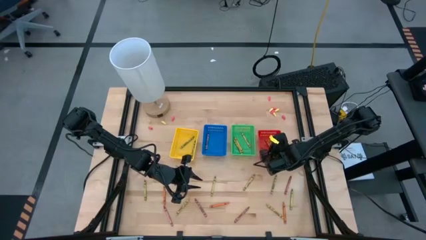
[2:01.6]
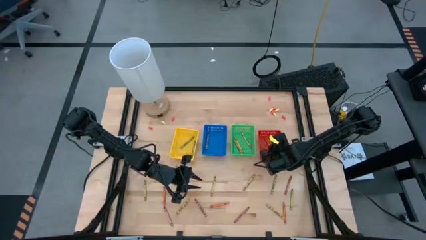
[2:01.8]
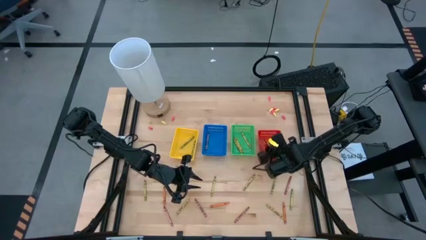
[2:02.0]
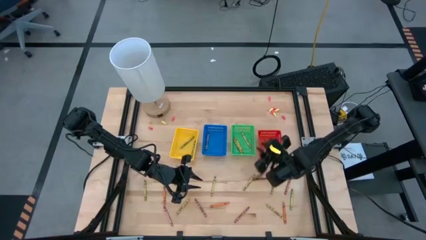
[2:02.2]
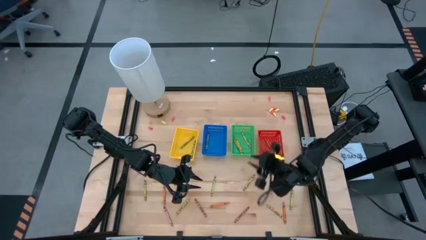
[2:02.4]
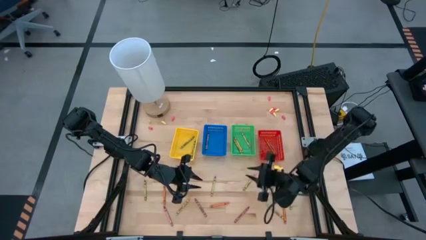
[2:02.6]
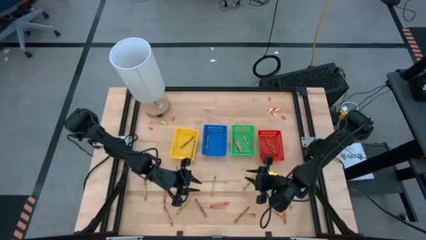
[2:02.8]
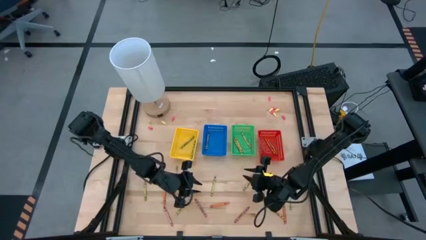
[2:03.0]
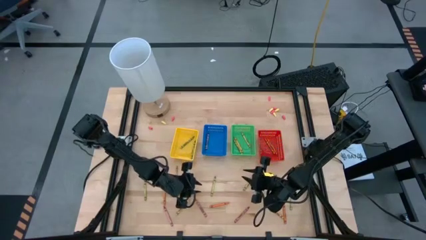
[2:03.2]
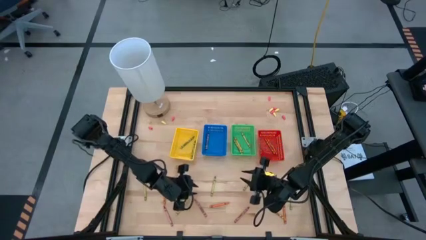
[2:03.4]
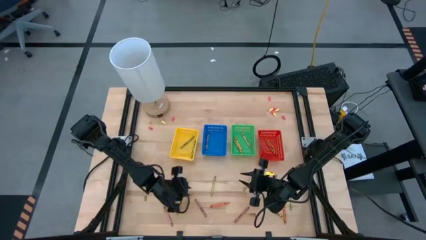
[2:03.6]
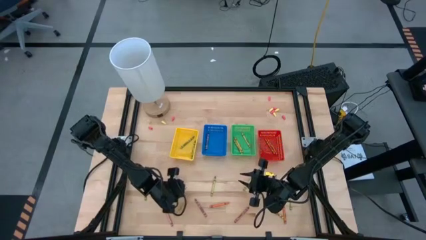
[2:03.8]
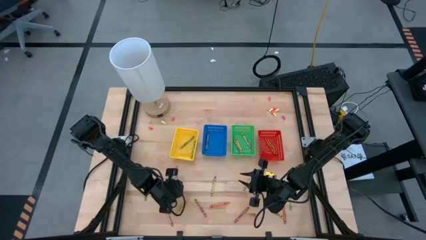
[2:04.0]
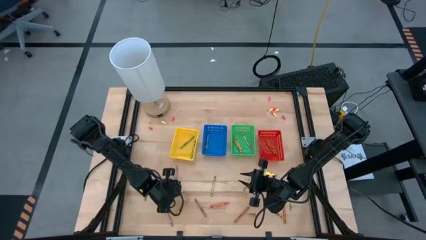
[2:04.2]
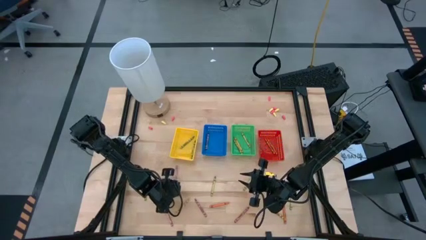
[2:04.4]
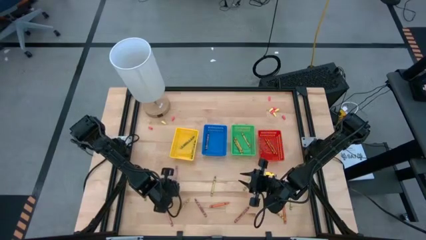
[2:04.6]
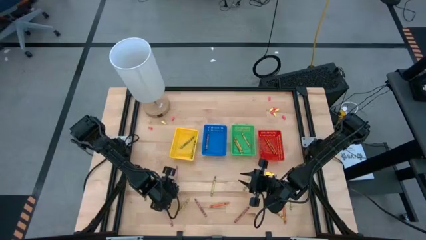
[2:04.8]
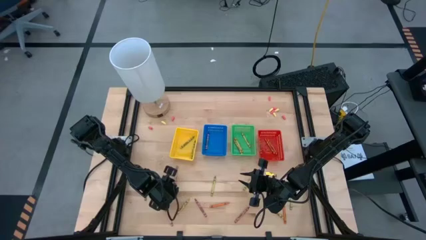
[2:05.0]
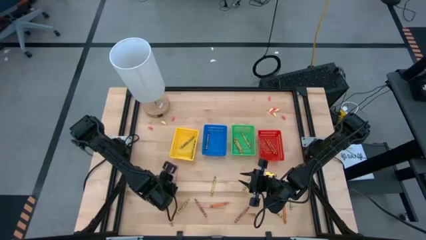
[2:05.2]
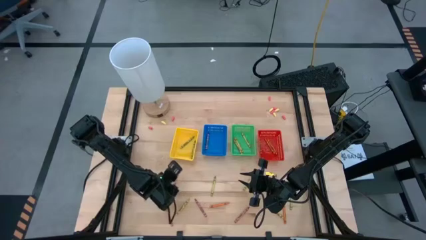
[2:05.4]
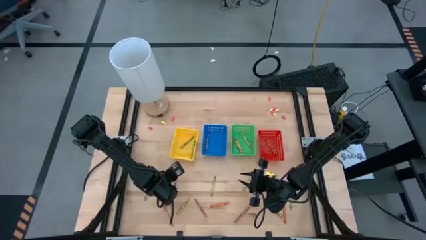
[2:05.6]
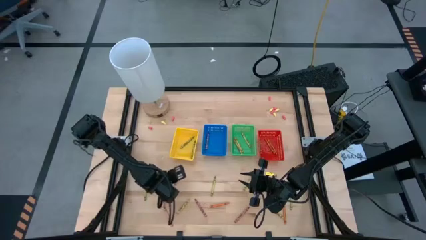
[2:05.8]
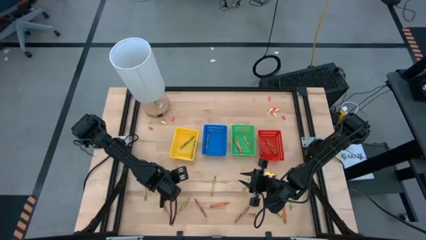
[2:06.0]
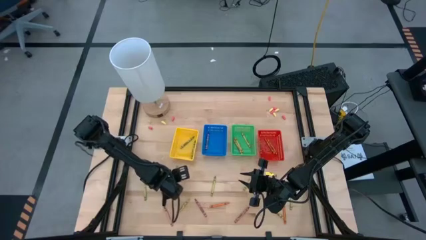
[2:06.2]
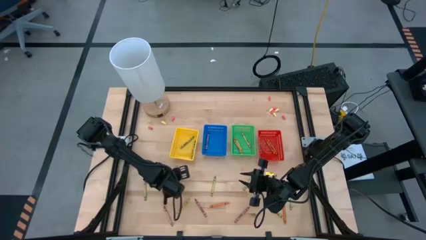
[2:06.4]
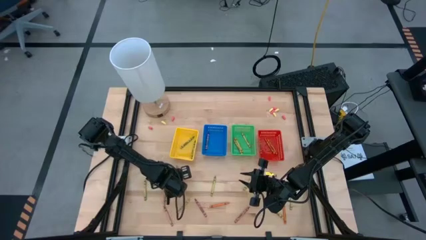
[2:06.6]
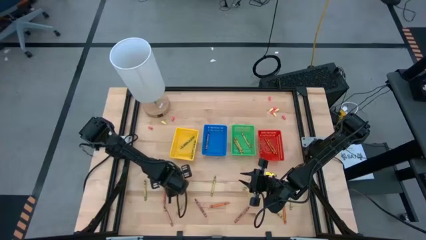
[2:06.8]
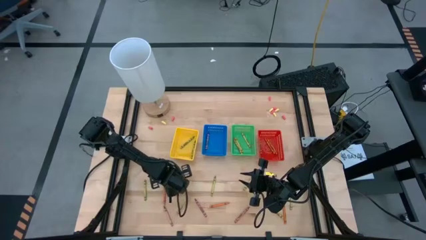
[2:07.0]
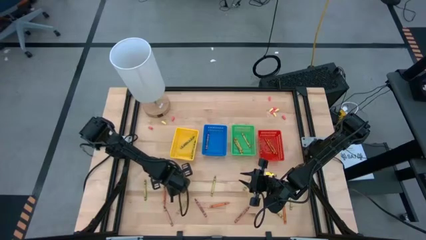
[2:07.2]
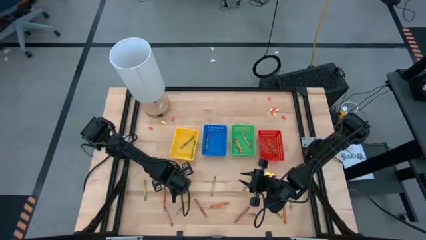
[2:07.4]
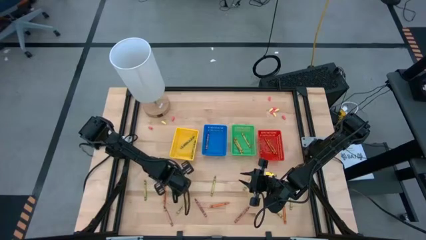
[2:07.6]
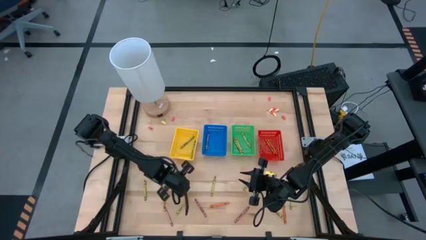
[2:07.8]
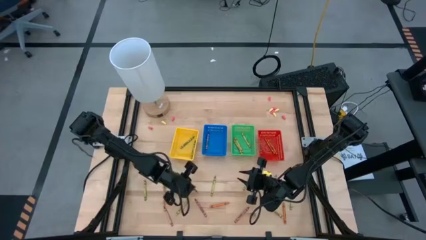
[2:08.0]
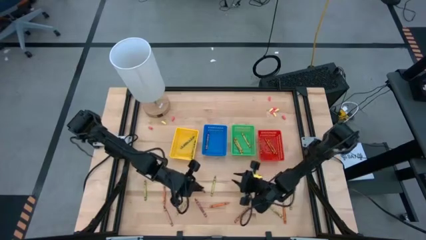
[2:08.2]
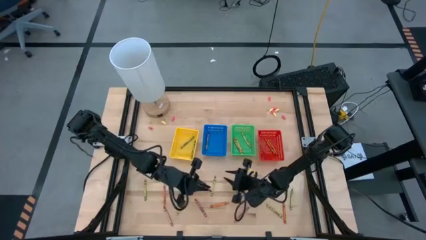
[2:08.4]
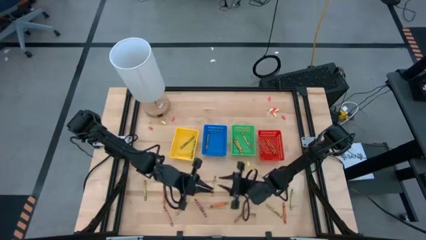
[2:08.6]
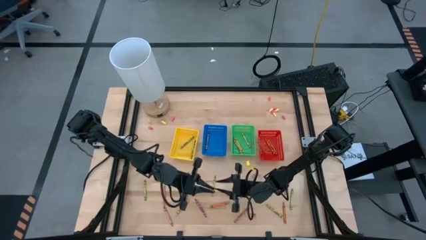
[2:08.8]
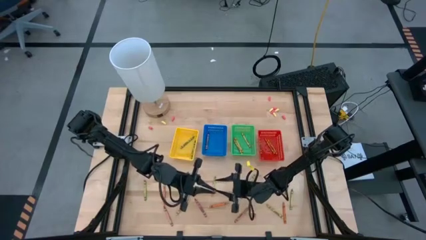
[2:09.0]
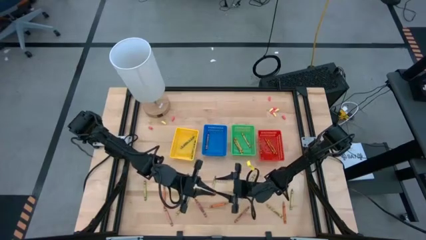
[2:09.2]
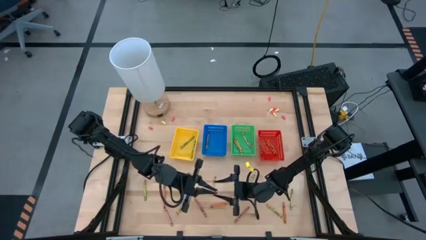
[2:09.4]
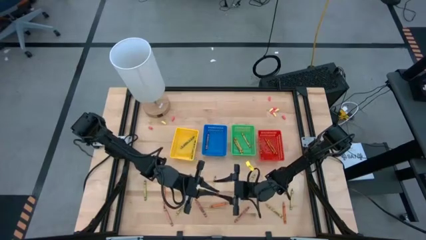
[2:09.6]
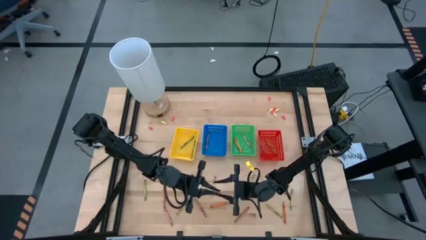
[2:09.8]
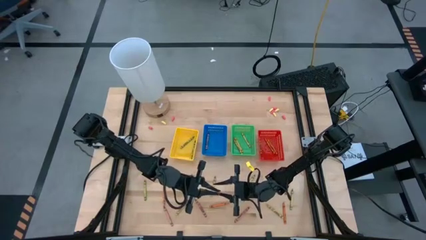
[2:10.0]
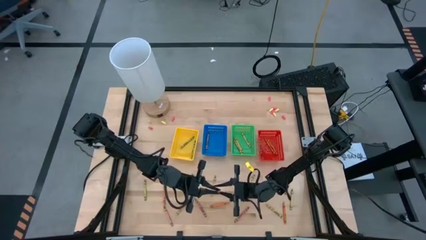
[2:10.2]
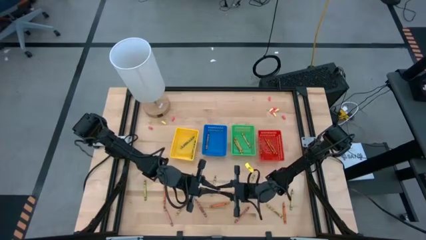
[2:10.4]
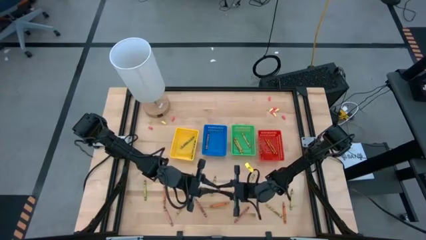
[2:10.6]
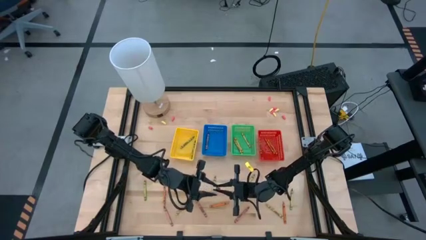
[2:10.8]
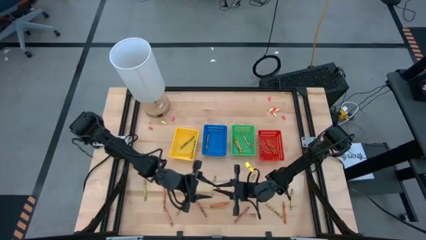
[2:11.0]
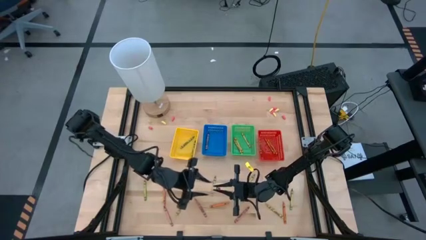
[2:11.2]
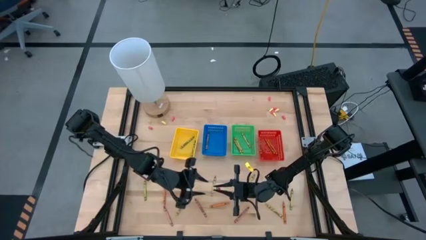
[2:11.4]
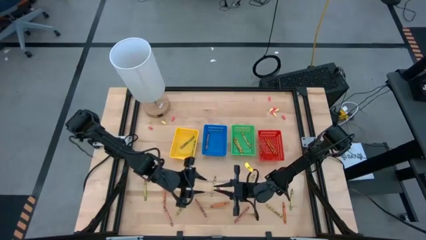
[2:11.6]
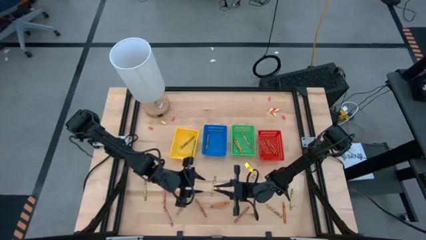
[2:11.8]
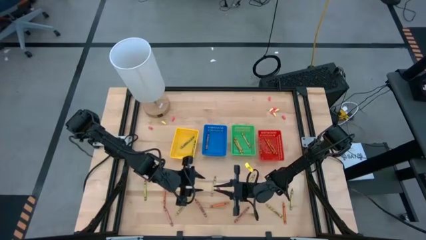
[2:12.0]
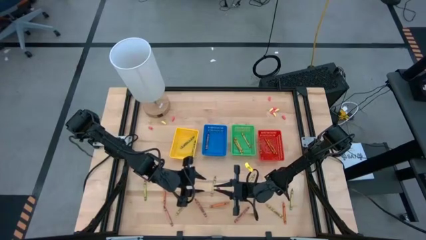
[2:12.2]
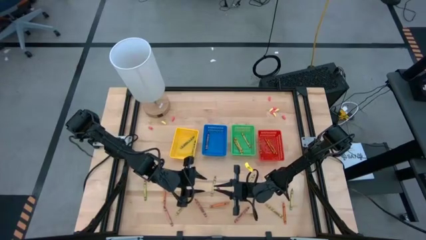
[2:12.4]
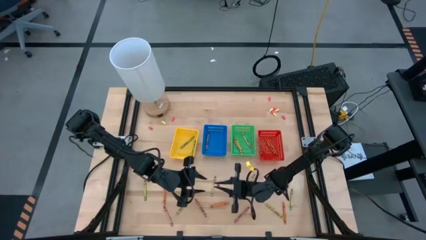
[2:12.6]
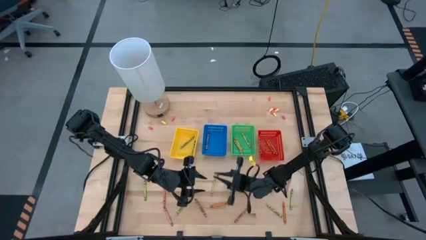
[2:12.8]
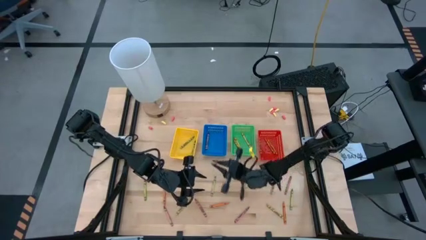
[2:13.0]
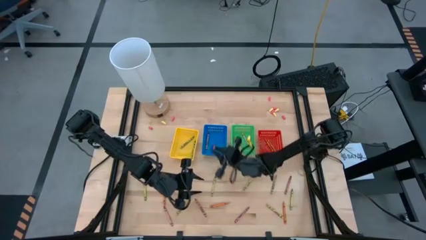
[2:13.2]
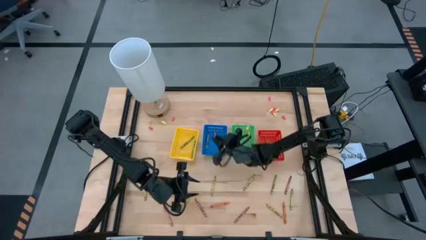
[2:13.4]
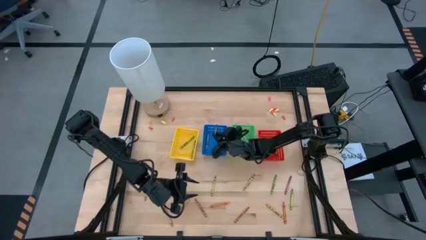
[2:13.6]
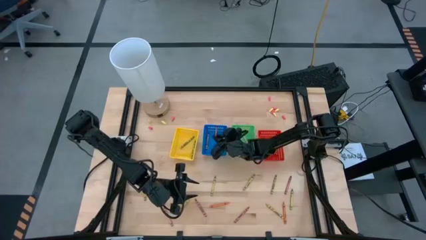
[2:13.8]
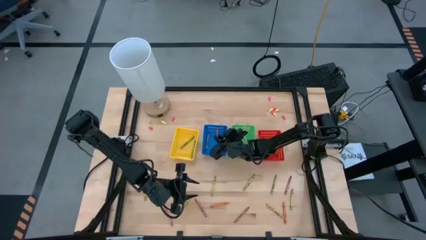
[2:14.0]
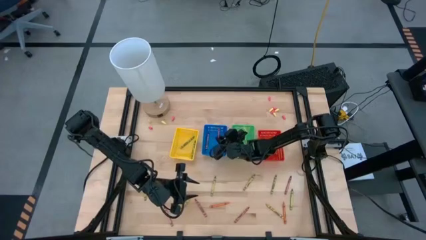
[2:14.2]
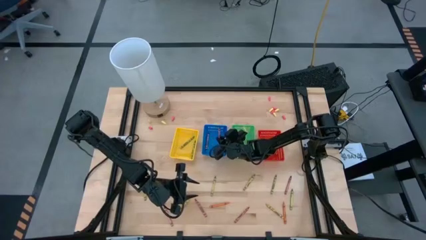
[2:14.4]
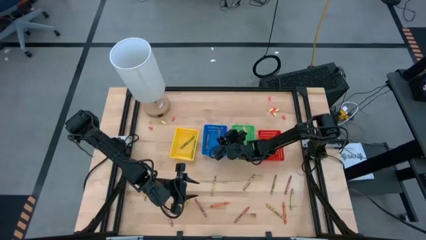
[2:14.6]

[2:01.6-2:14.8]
Task: Sort crayons
Put the red crayon into the blue bin

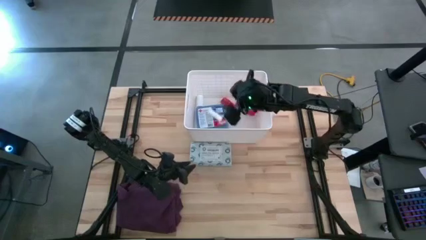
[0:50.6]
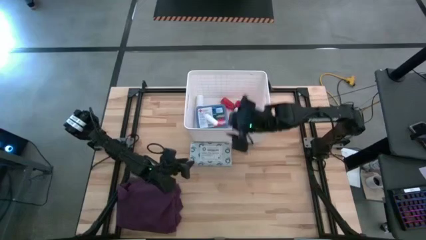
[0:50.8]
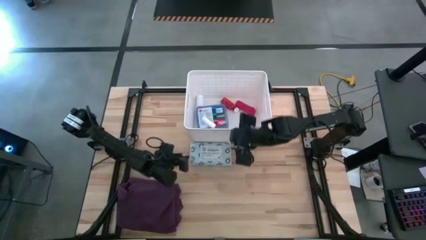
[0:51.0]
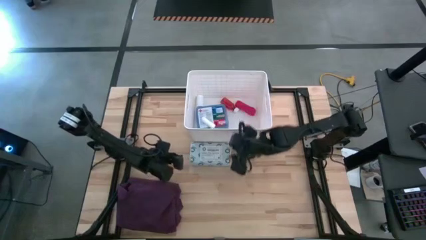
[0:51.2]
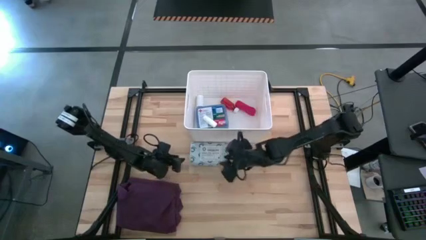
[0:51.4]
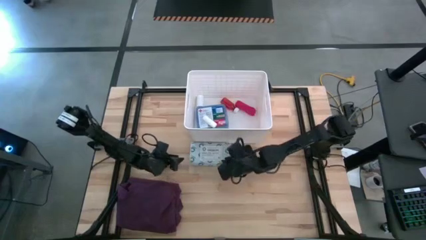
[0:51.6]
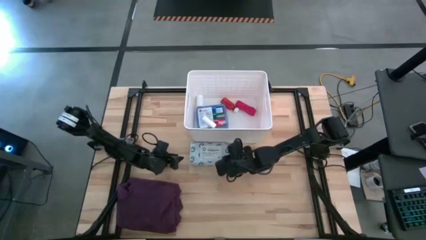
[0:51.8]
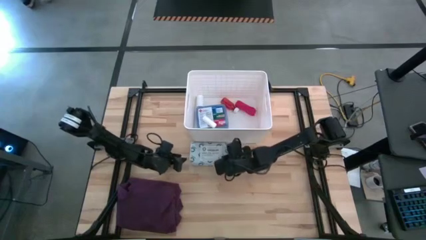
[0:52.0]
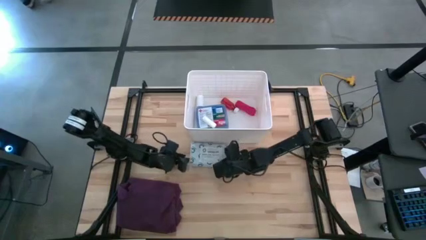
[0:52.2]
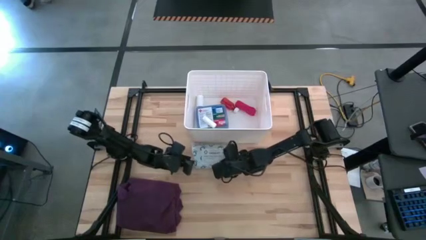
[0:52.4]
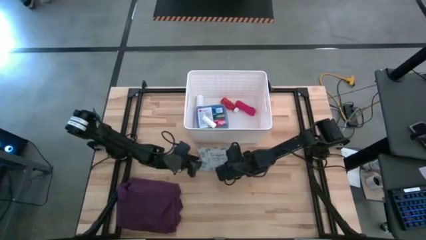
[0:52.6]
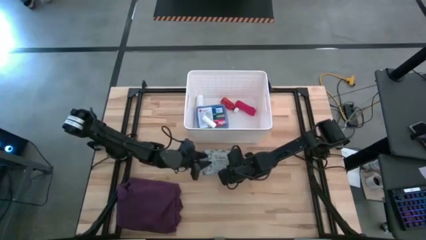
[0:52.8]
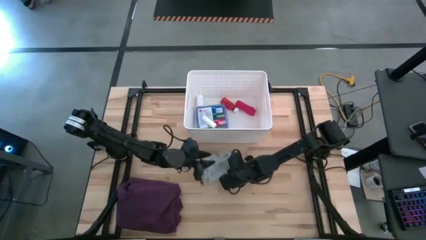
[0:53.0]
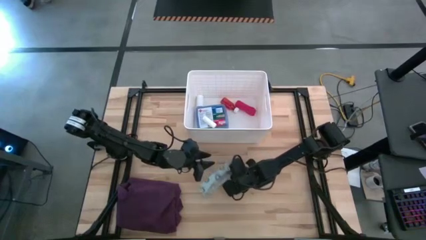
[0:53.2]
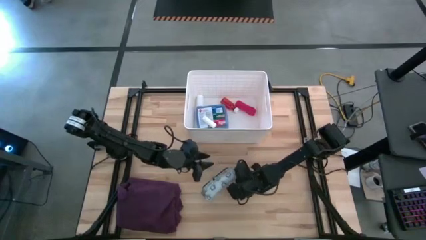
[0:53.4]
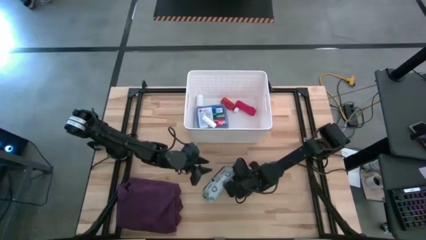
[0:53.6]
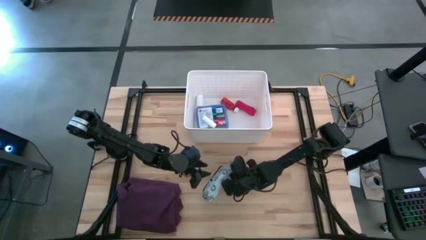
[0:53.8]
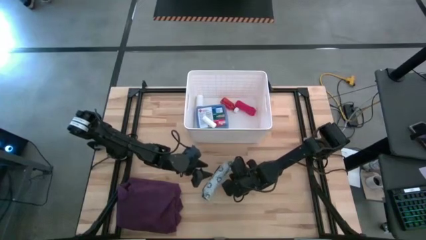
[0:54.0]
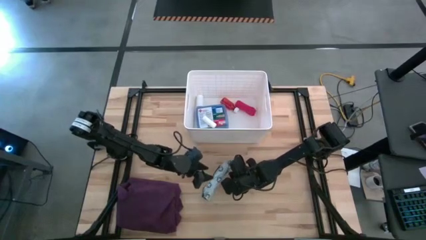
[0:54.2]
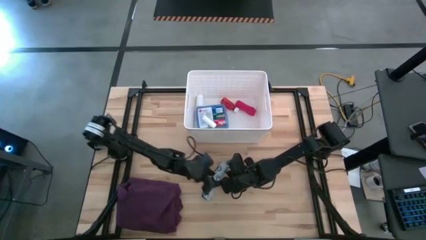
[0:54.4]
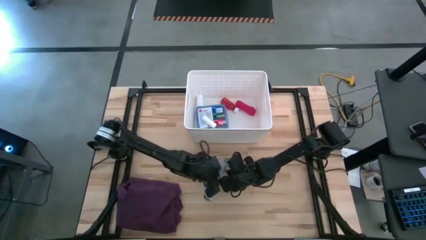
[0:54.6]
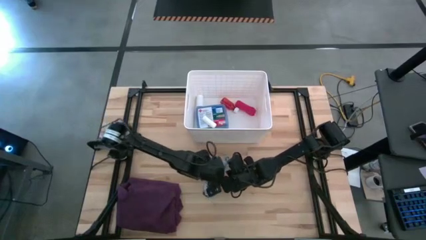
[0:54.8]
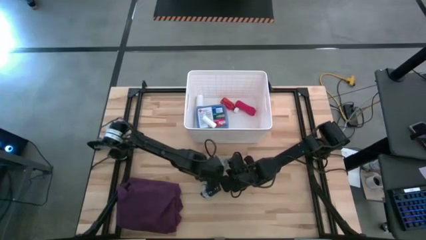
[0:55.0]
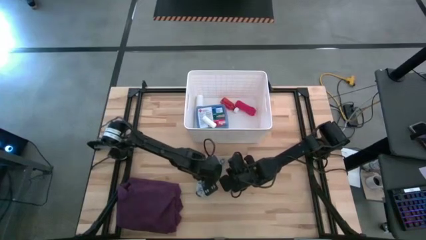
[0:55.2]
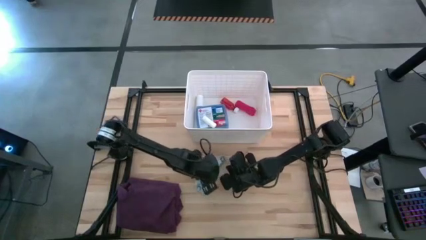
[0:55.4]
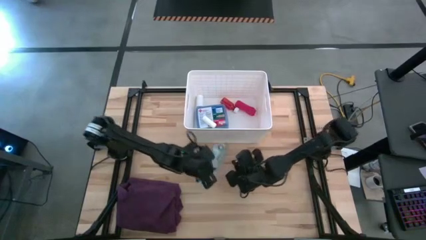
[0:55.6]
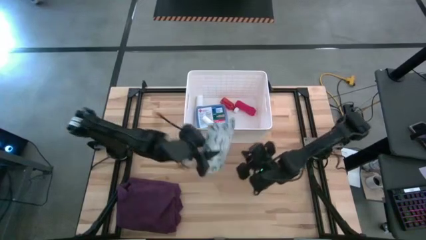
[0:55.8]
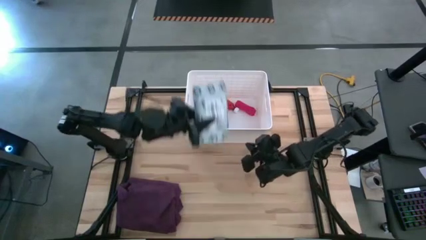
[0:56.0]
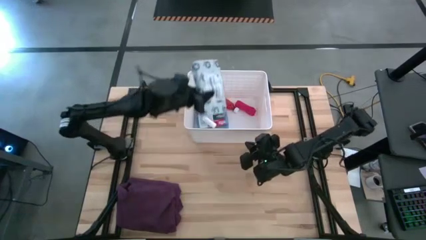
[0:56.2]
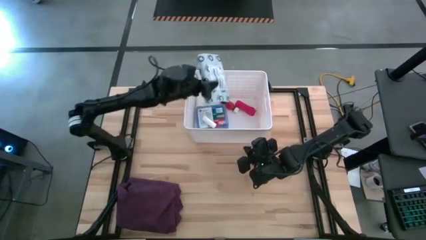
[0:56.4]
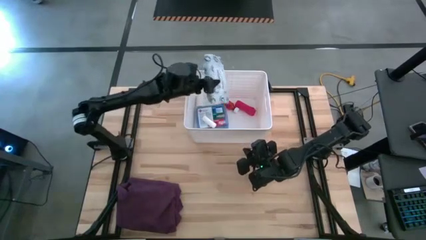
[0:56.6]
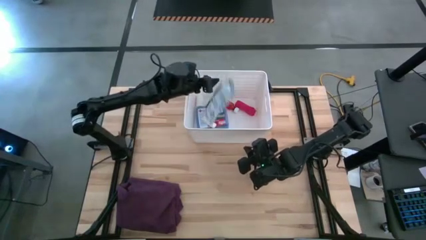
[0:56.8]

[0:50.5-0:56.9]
Task: Pick & place medical supplies in basket/bin
Put the white mailer bag into the white bin
